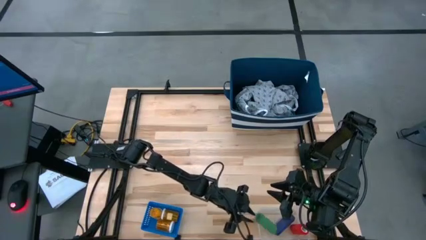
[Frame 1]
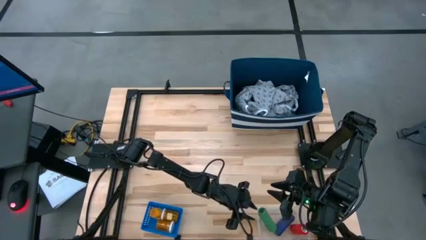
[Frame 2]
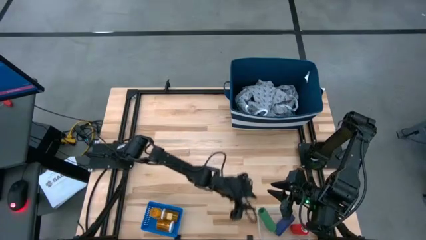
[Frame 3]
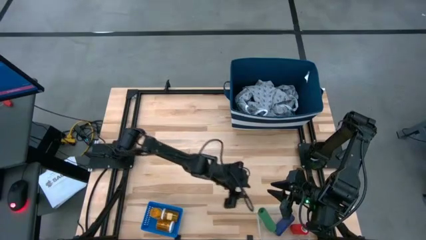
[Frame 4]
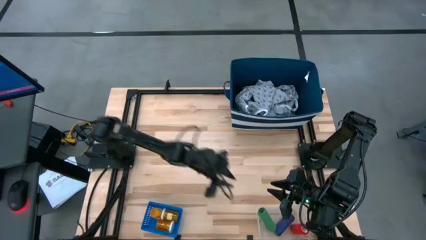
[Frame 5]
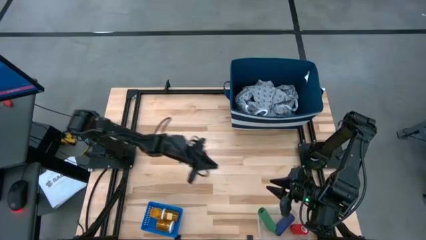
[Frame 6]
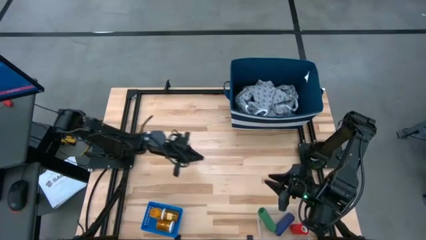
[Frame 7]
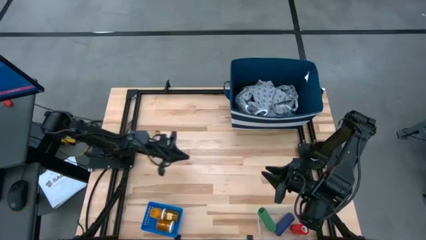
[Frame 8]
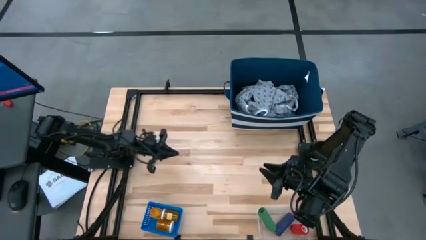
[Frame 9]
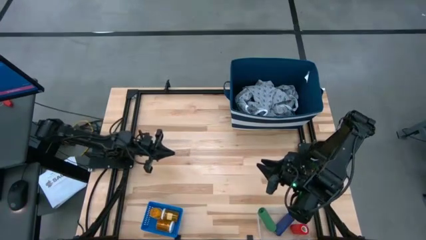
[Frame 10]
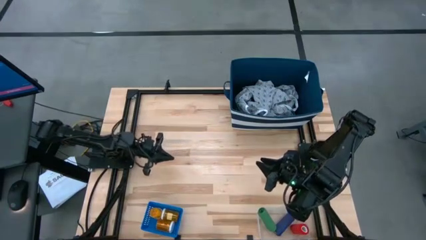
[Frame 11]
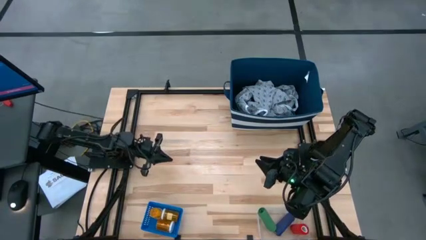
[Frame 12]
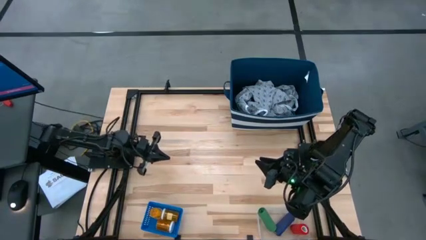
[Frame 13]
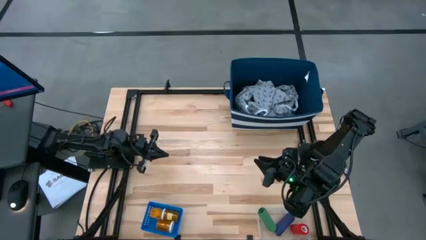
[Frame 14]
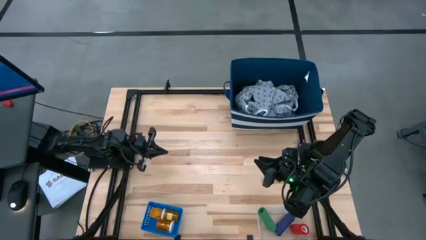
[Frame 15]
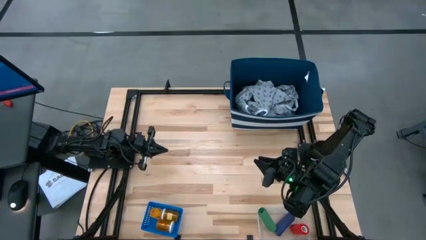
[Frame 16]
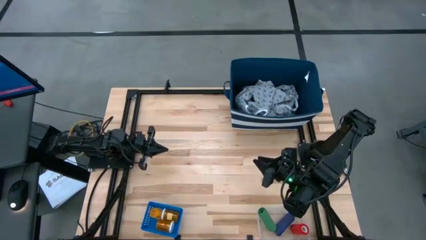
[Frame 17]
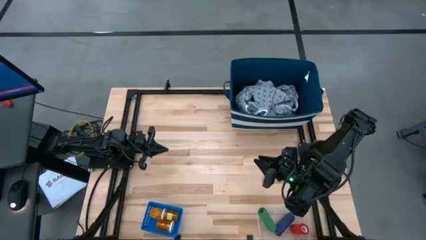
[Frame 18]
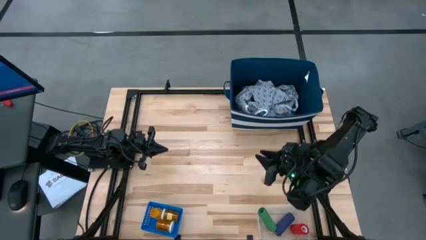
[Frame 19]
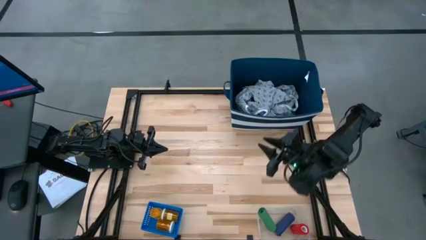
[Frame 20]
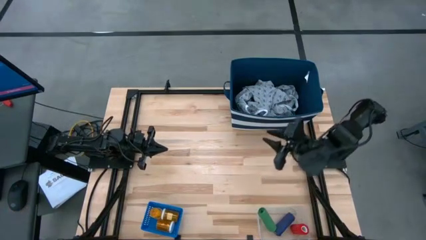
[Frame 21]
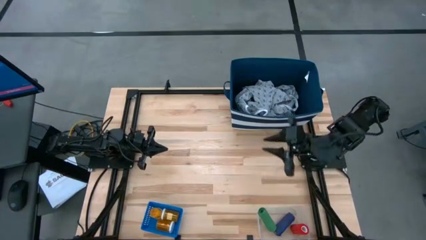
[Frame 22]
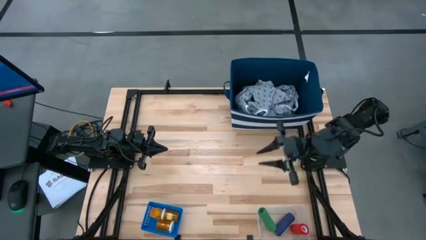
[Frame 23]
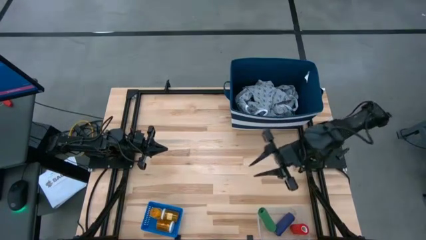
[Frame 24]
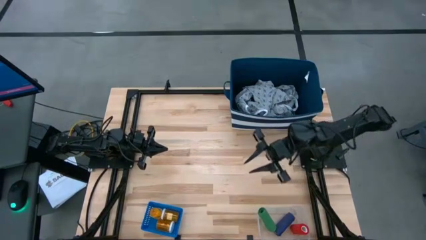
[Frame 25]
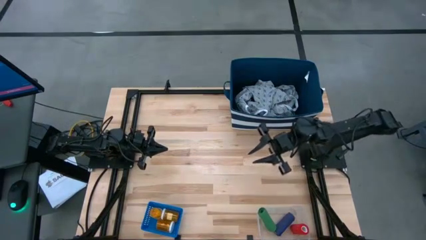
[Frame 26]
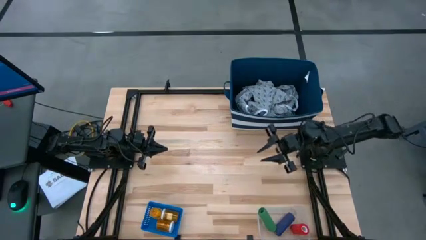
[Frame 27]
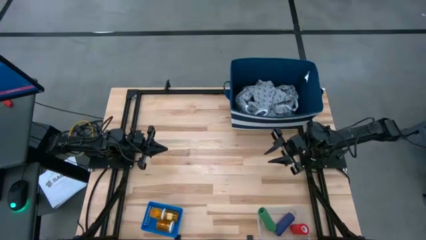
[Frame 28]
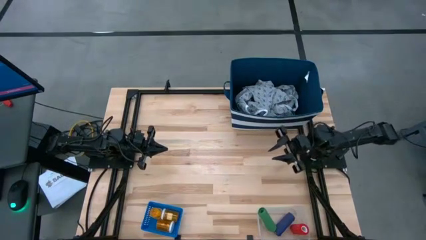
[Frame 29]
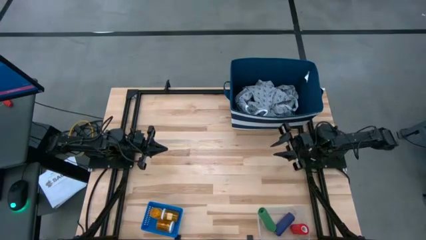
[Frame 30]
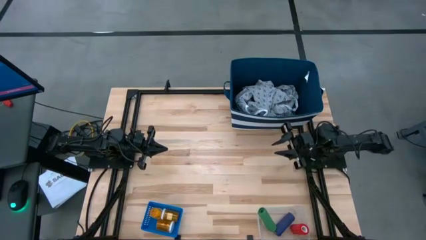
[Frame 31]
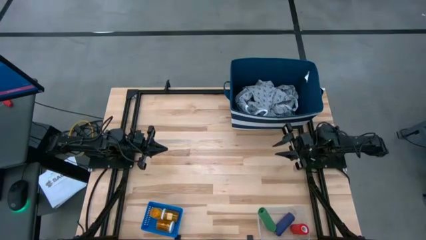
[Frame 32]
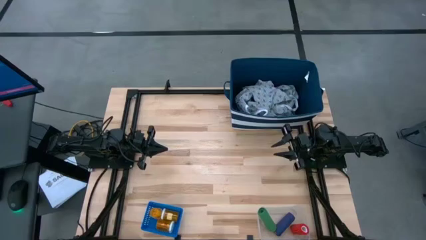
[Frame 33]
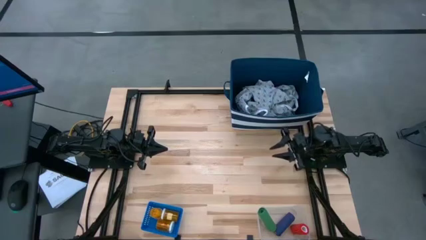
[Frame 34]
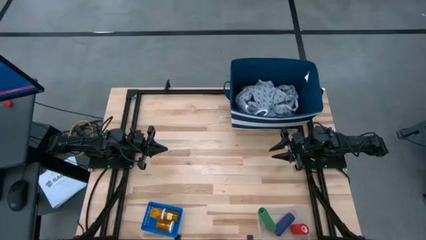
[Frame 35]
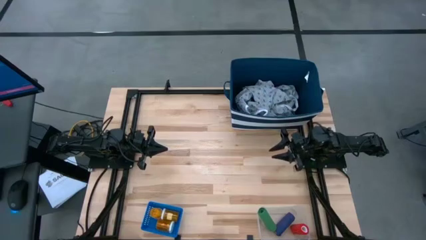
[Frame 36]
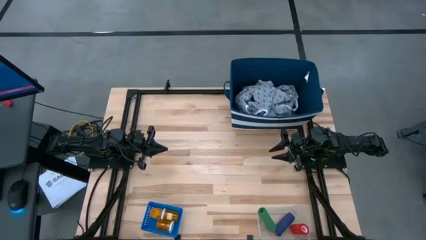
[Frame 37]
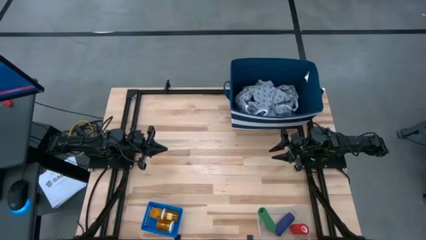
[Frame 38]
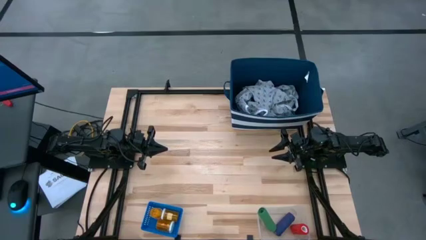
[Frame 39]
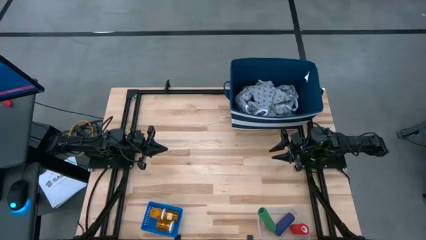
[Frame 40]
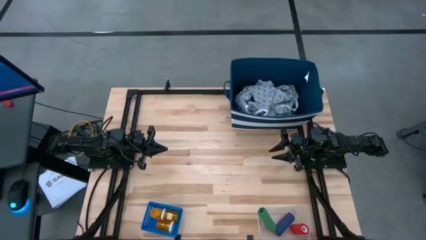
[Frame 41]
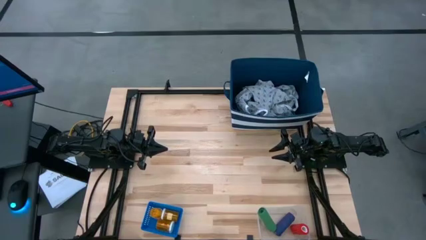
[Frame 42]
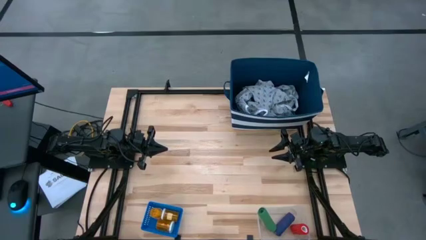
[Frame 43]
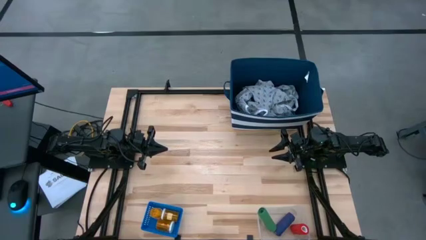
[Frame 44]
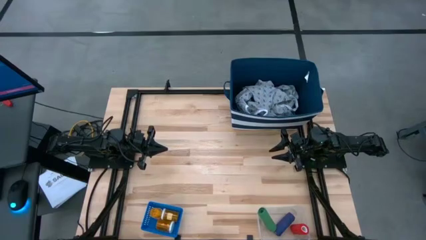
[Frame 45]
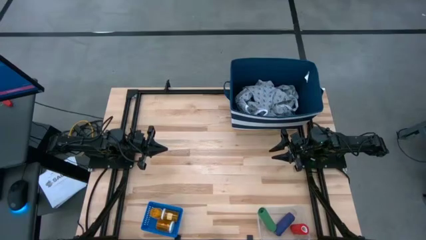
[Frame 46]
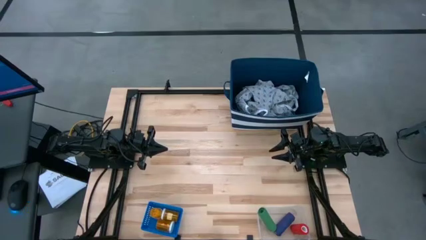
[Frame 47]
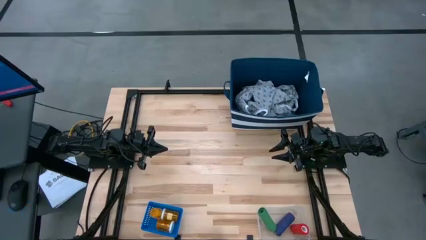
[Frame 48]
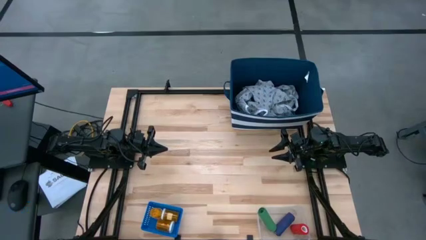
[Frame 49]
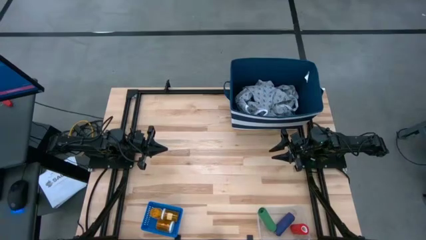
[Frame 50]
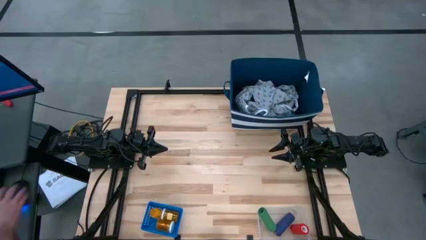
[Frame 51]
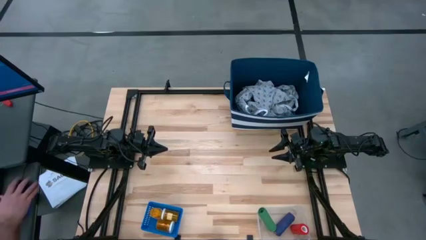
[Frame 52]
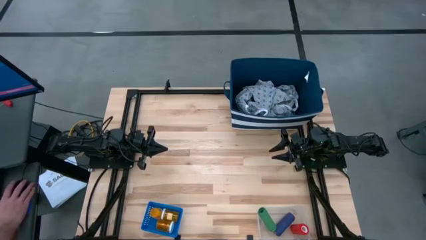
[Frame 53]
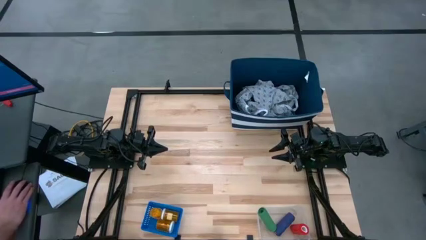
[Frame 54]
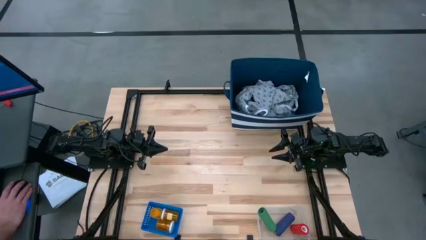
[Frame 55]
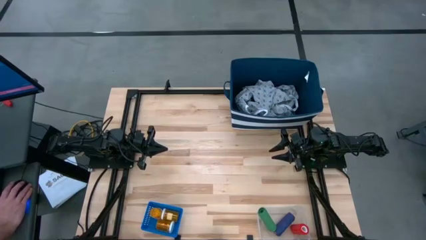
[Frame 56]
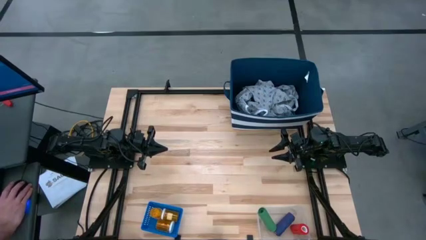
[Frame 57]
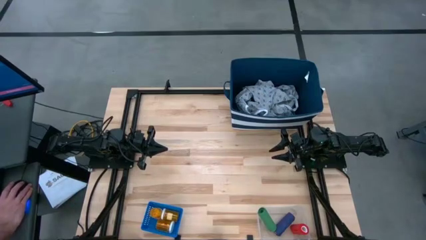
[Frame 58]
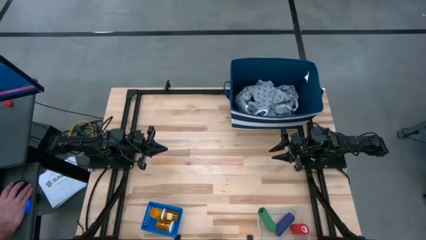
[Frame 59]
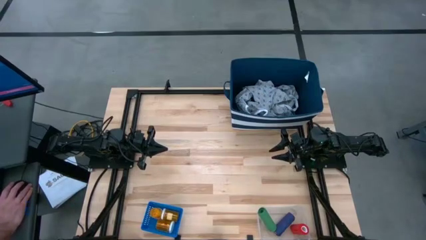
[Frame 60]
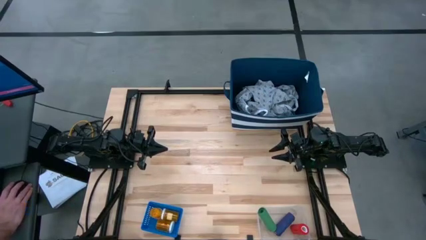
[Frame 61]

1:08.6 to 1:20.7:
Task: Pick & place medical supplies in basket/bin
Return to Home Position

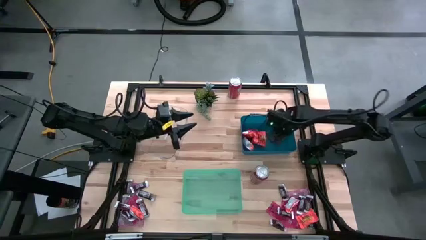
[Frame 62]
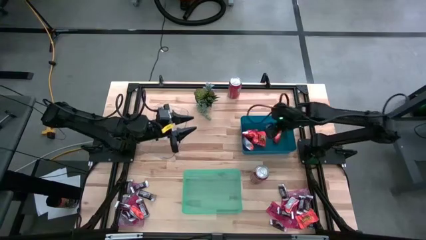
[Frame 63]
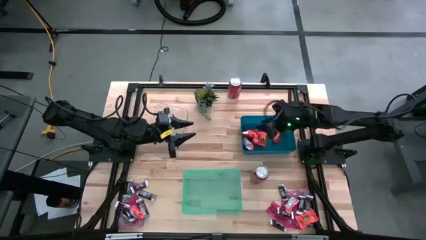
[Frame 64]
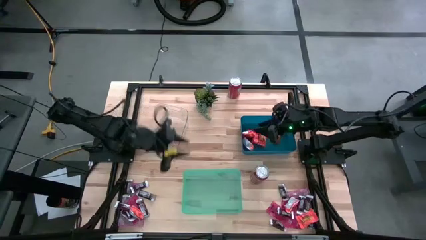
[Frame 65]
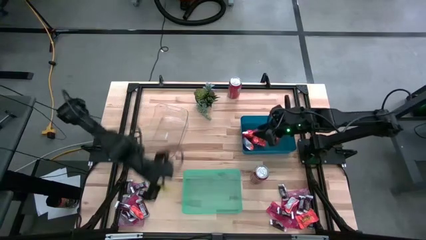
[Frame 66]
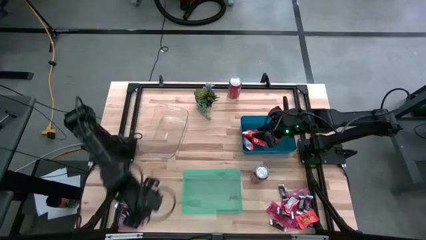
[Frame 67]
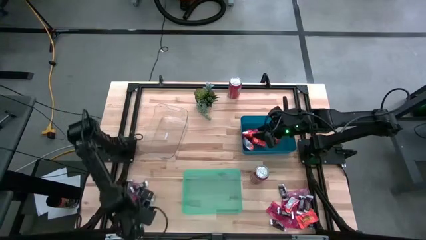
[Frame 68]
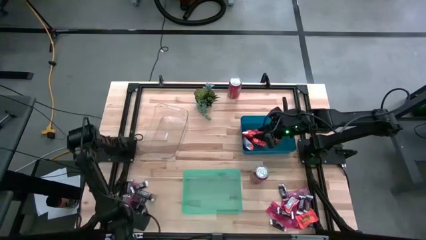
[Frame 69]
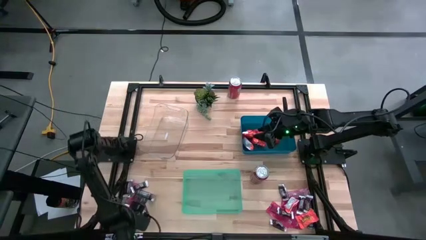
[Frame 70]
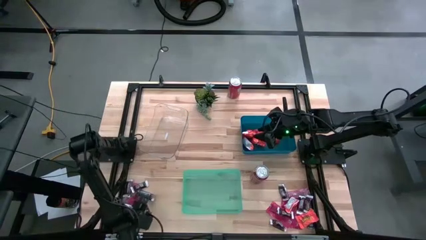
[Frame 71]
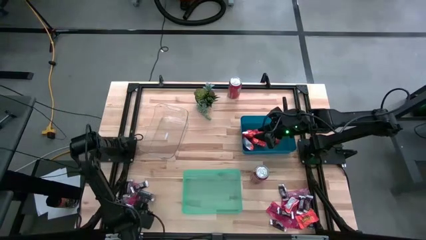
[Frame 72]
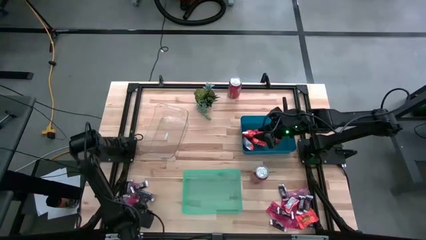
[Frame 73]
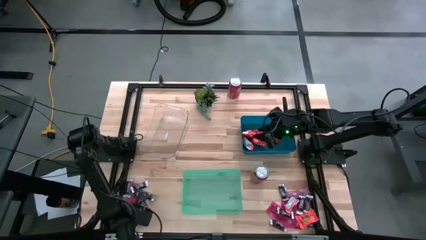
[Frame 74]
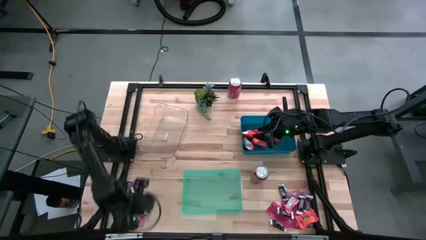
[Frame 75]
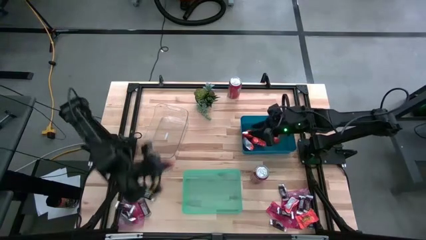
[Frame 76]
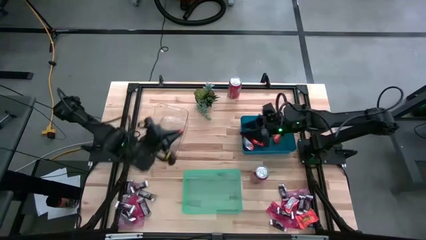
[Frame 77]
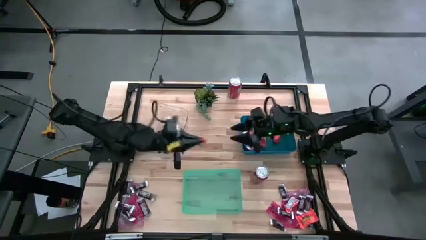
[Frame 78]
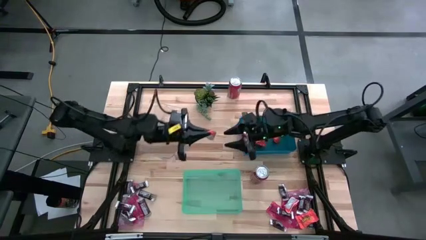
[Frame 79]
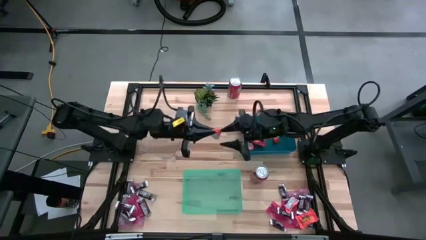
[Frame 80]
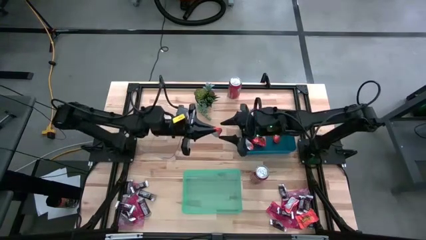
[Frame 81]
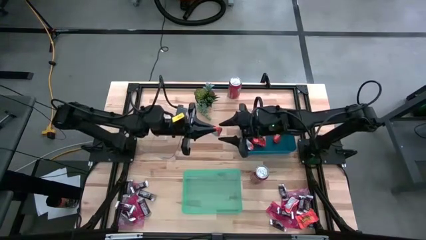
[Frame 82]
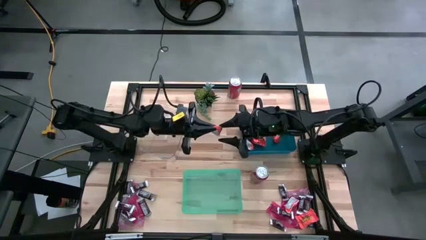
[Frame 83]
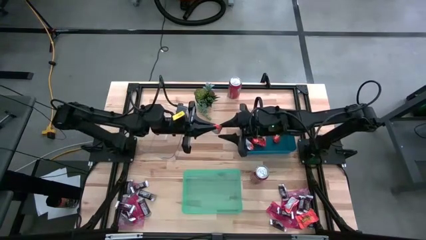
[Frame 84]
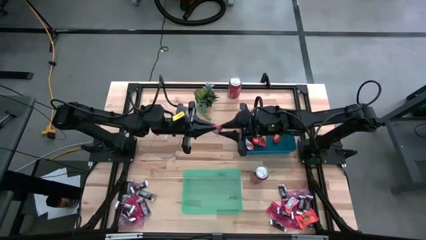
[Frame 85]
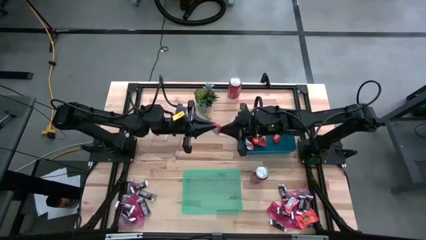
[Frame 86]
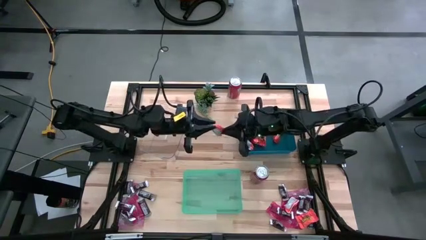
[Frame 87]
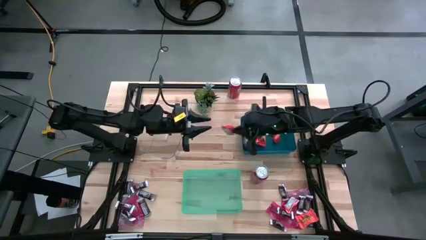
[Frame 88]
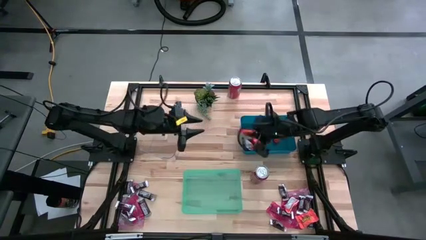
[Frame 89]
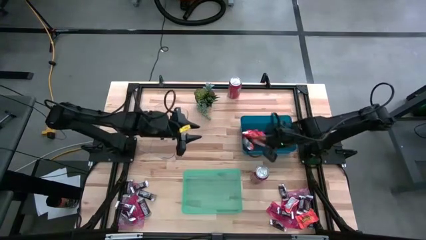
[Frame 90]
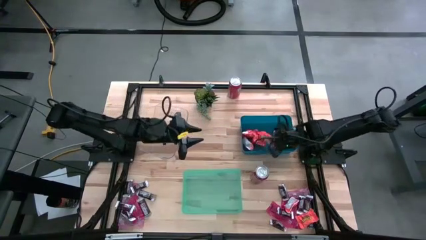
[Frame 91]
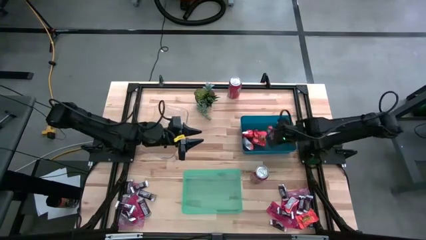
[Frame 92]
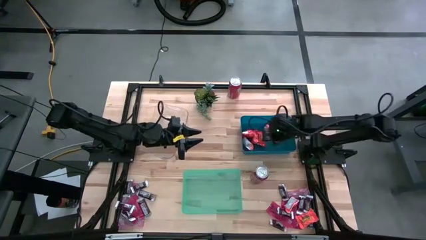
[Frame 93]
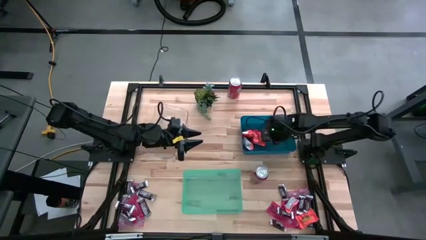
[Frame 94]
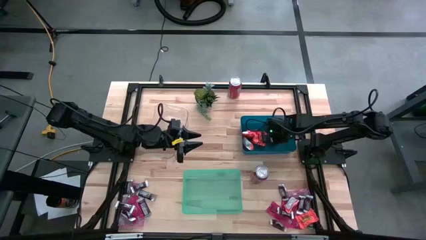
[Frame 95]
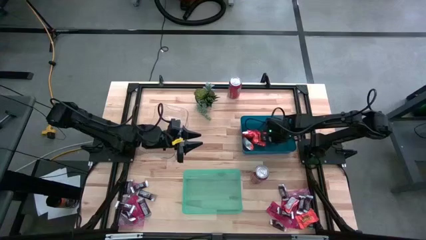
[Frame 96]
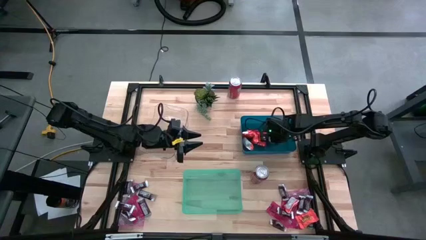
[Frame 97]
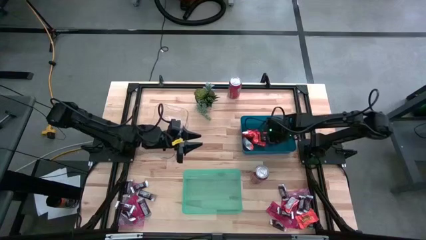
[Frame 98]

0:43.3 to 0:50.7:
Task: Sort candy
Put the orange chocolate into the blue bin
